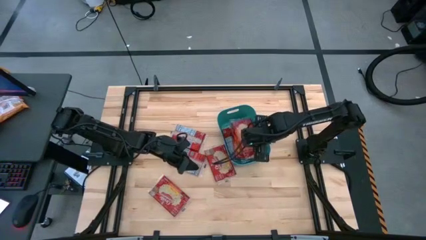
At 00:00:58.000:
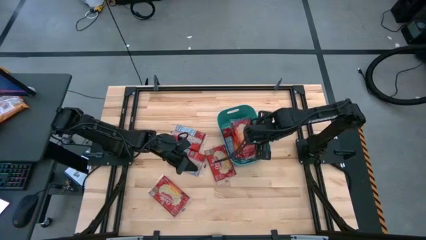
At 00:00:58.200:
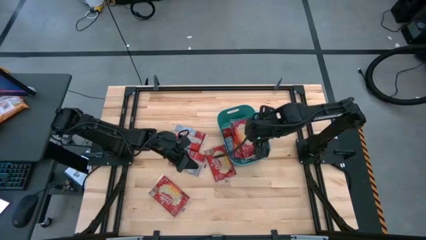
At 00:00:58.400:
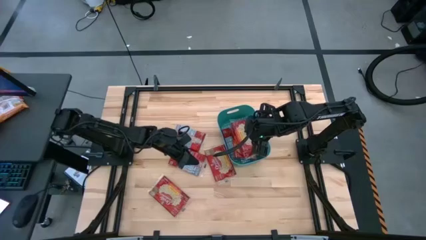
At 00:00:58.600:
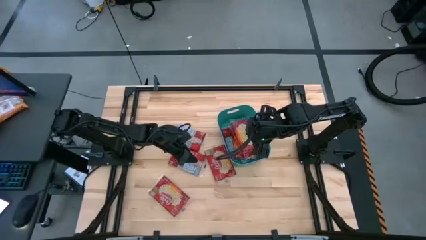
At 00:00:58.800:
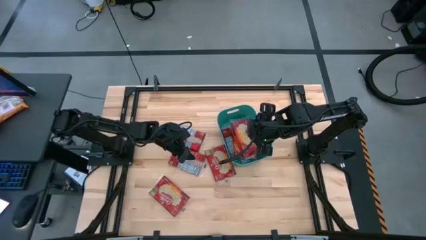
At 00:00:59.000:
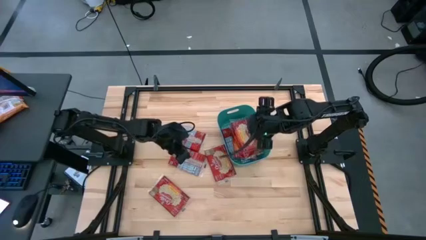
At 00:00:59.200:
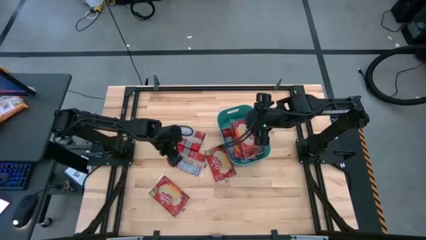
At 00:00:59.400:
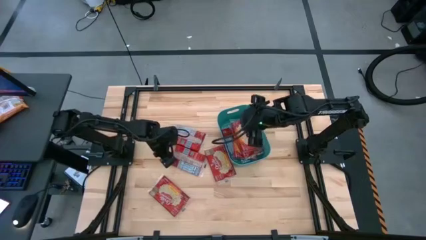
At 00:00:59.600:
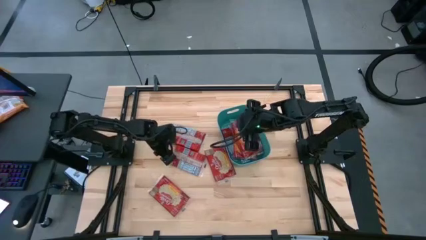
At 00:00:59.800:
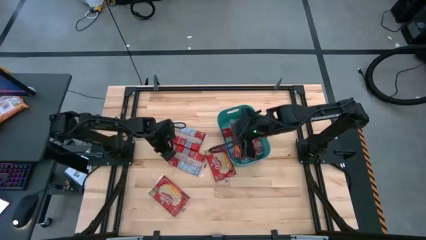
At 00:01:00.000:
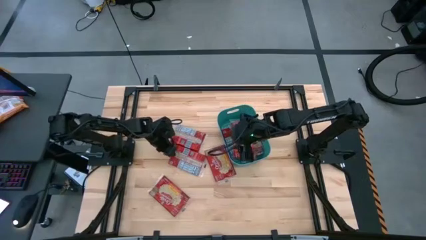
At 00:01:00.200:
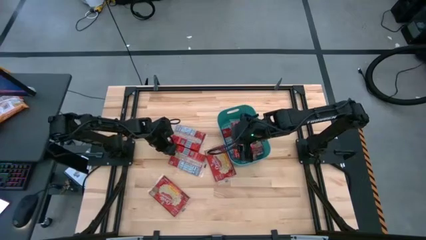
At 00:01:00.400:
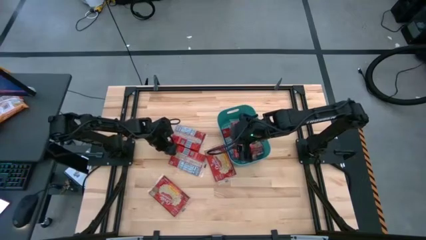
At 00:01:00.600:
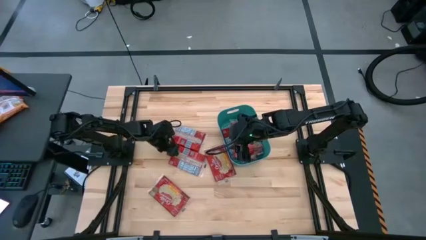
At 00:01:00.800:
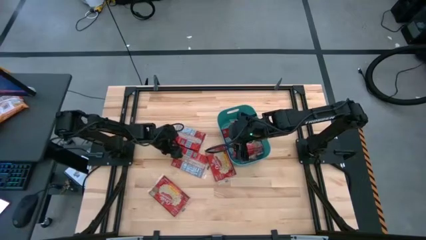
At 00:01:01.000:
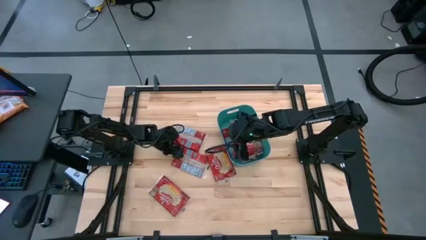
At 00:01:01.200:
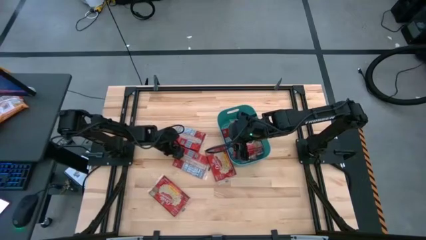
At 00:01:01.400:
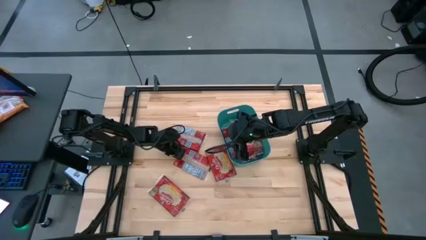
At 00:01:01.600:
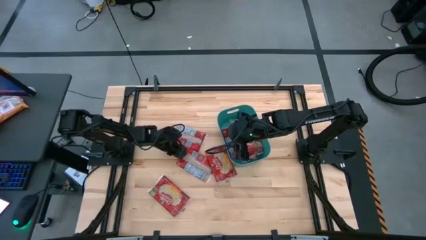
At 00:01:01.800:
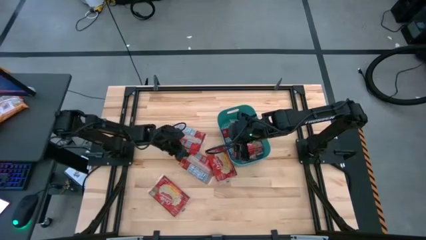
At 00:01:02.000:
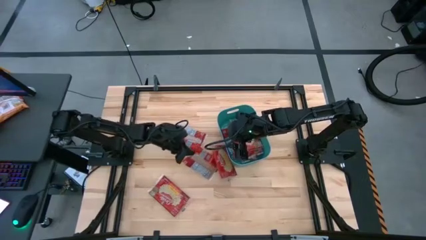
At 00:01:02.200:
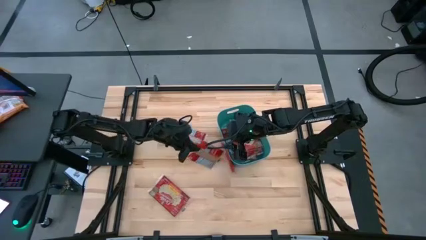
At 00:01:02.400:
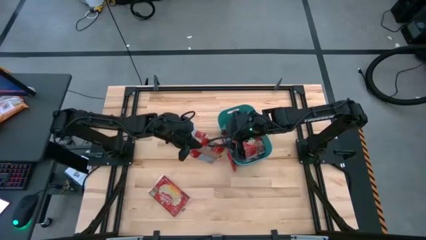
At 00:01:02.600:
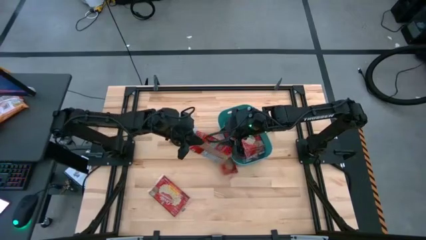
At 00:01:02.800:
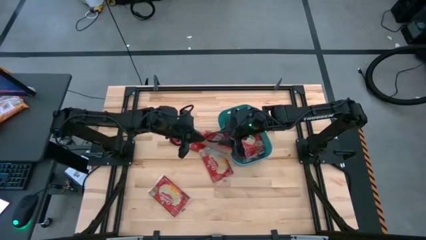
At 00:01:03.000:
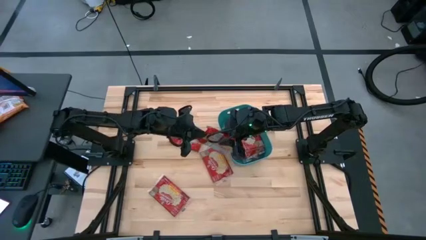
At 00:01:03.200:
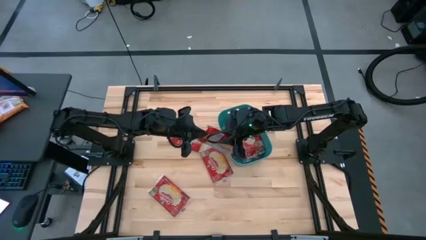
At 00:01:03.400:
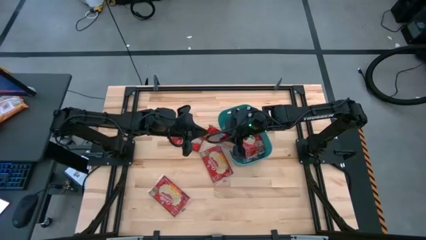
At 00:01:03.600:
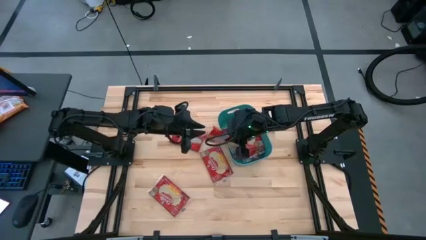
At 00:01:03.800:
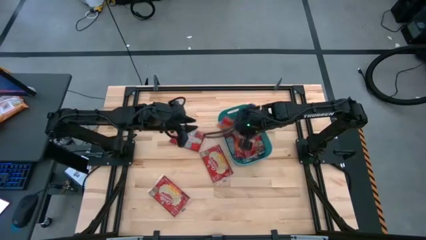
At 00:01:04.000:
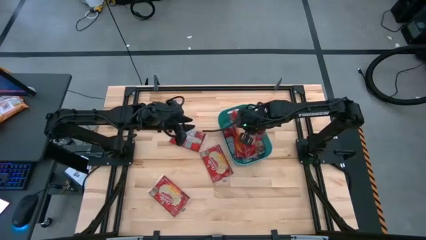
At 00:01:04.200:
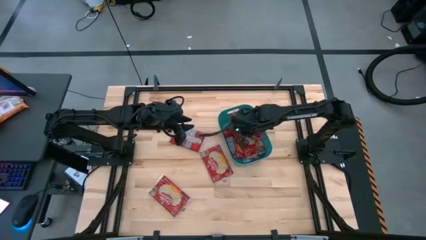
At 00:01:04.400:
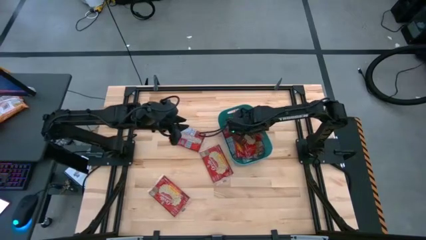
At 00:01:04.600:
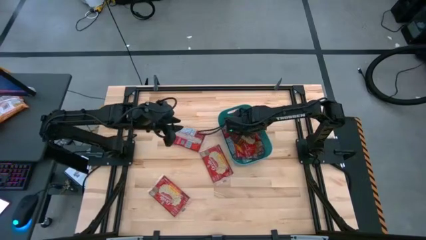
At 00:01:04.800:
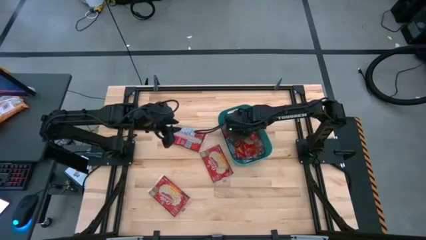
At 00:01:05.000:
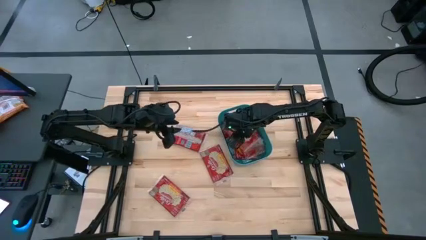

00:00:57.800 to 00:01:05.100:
Task: Sort popcorn bags into baskets
Put the red popcorn pack into the green bin

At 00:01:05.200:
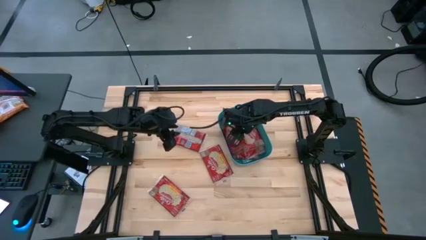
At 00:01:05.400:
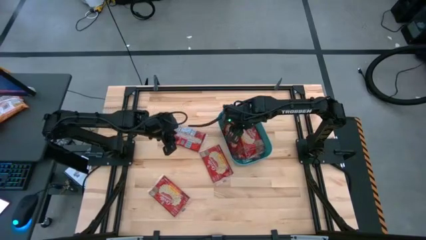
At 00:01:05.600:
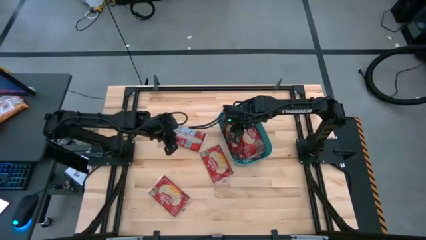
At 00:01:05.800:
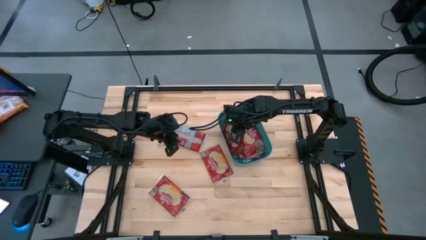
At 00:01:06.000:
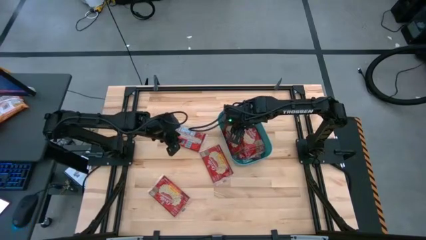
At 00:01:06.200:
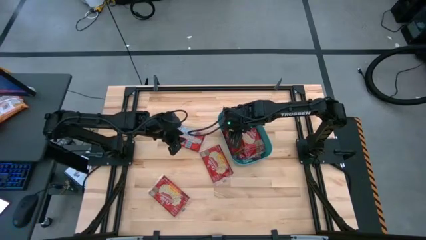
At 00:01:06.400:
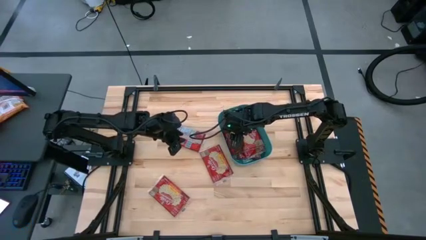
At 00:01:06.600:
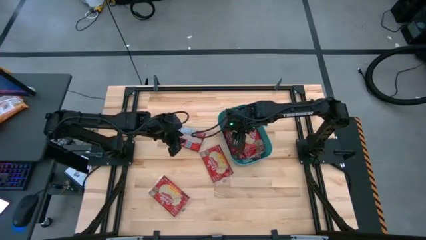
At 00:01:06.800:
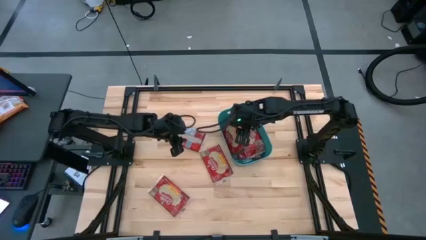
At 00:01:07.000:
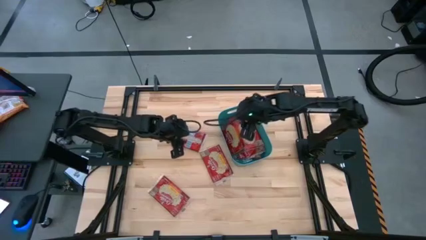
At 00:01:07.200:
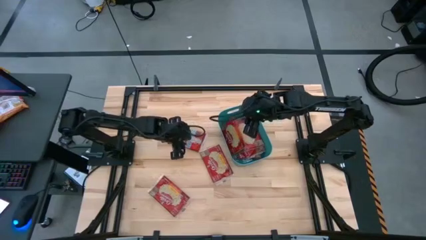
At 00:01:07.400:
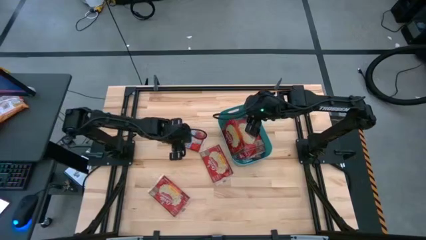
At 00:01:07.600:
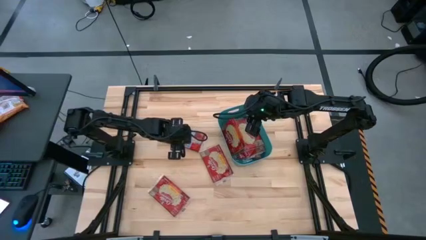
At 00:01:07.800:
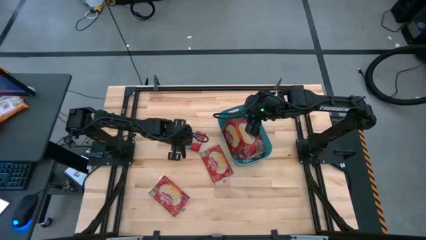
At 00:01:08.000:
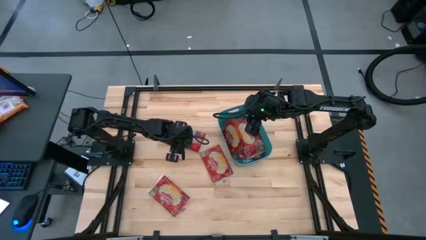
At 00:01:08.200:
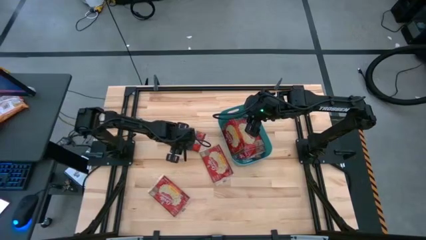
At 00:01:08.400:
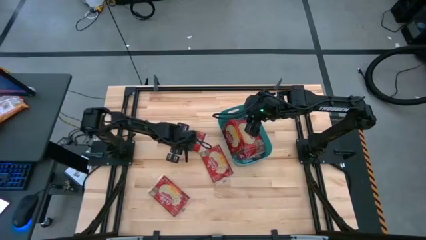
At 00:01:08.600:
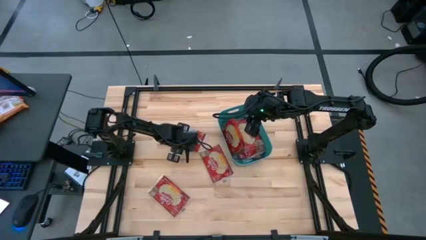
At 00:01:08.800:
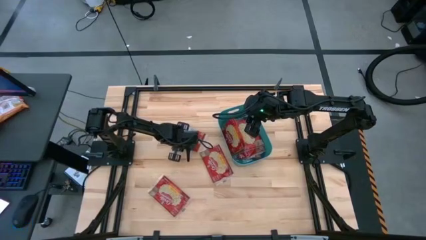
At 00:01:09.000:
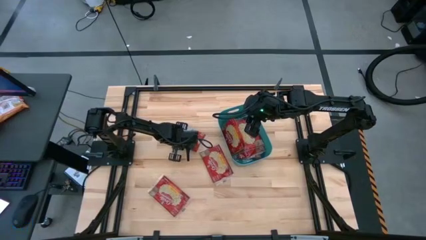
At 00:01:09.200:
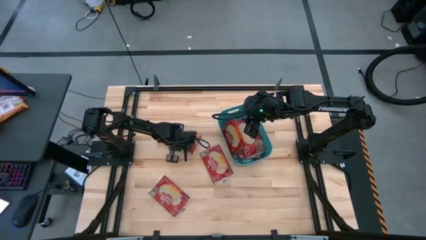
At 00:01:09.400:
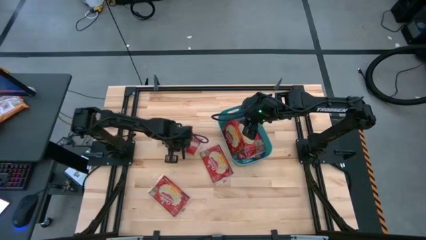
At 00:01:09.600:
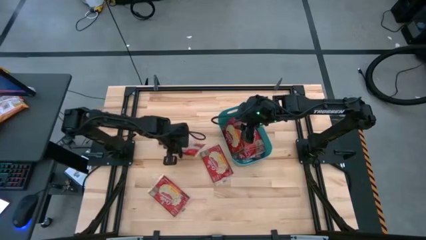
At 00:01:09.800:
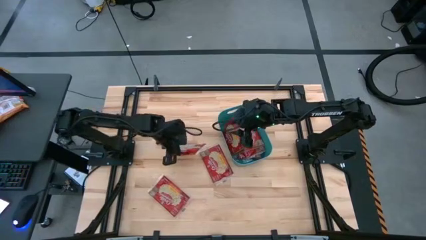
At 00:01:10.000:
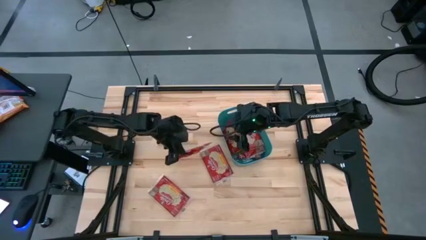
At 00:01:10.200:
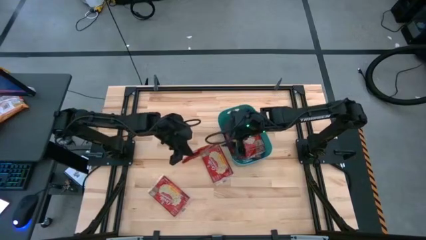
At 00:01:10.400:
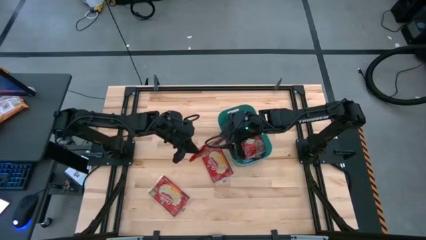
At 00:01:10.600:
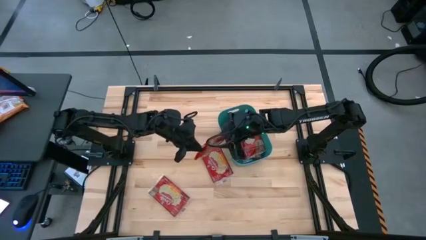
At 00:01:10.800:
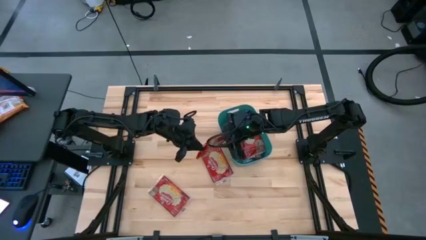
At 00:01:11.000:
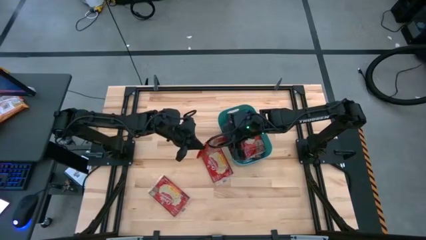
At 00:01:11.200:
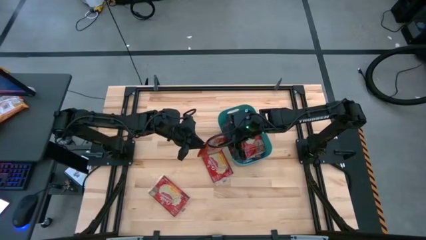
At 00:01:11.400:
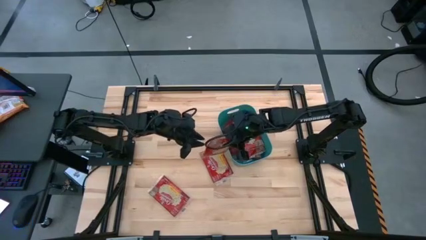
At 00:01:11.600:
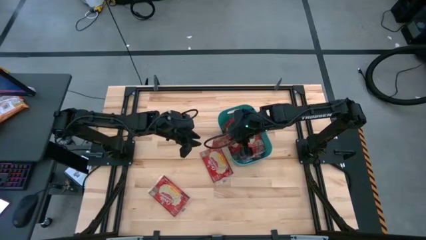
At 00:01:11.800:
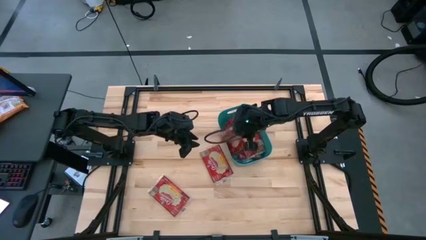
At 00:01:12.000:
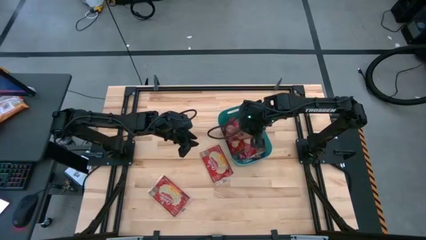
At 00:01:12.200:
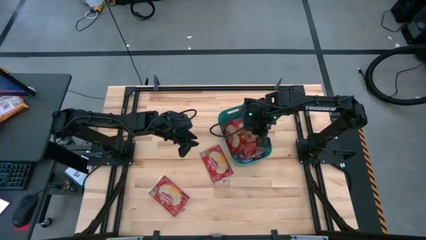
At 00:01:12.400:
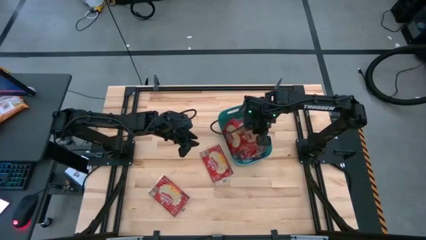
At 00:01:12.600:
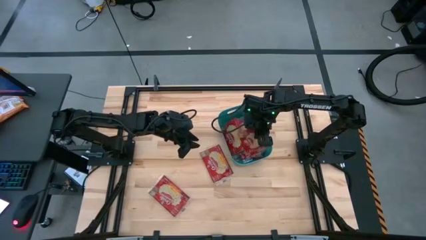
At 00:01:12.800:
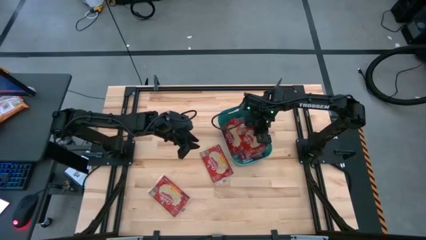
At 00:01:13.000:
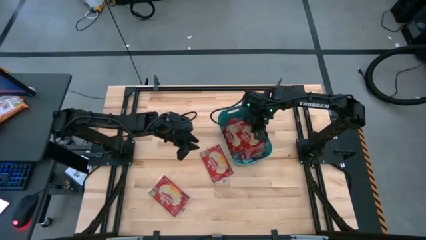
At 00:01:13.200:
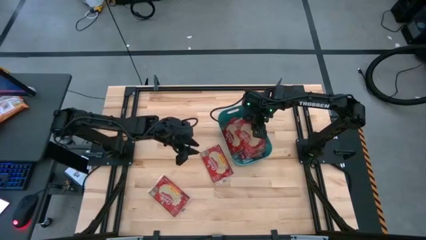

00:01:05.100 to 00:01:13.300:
Put the red popcorn pack into the green bin

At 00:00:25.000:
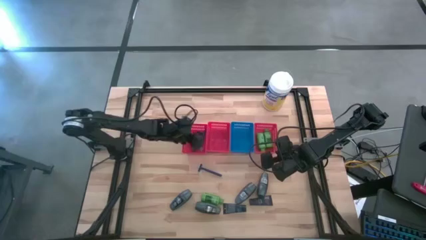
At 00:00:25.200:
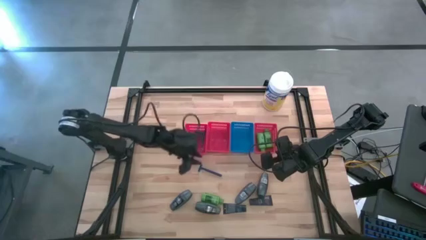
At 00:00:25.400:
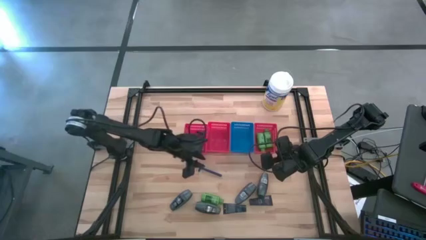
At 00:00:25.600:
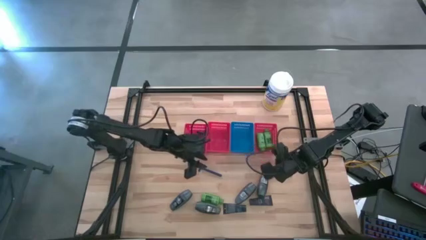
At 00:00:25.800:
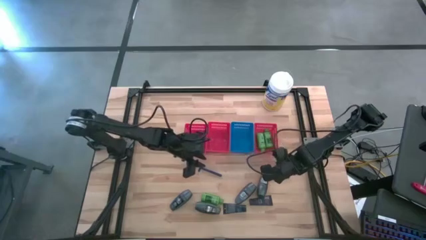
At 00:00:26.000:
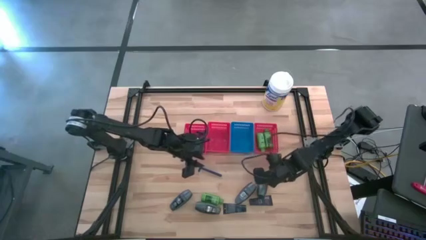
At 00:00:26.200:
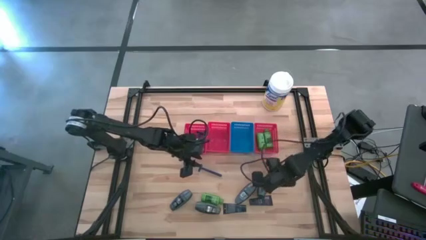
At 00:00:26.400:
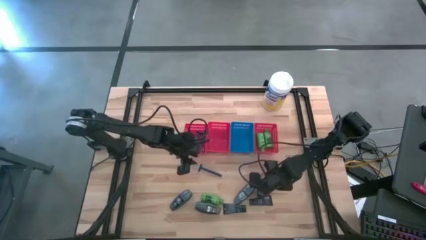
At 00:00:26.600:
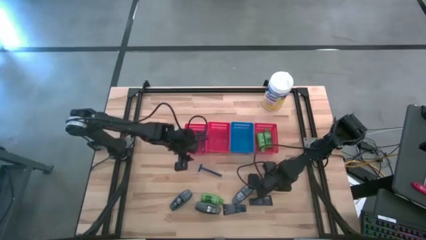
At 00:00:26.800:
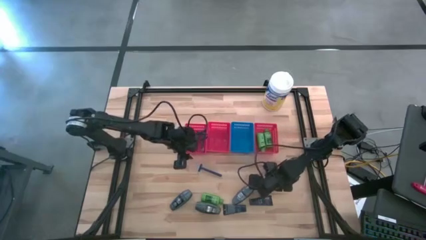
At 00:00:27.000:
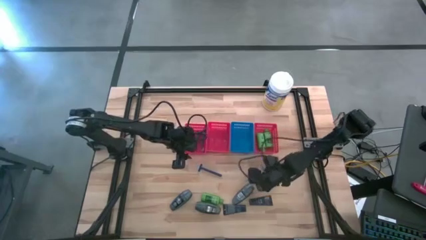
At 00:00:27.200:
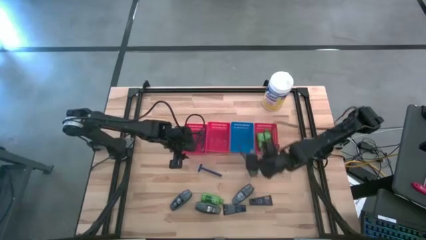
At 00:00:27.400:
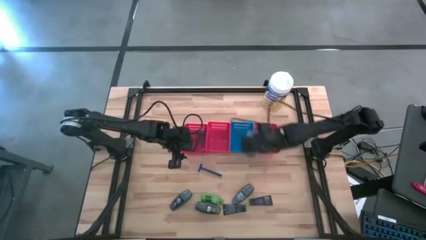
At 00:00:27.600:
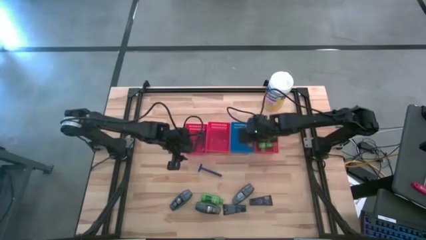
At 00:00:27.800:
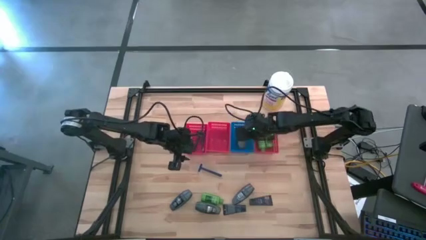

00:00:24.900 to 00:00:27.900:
Task: Pick & Place Travel size toiletries
Put the gray deodorant into the blue bin
